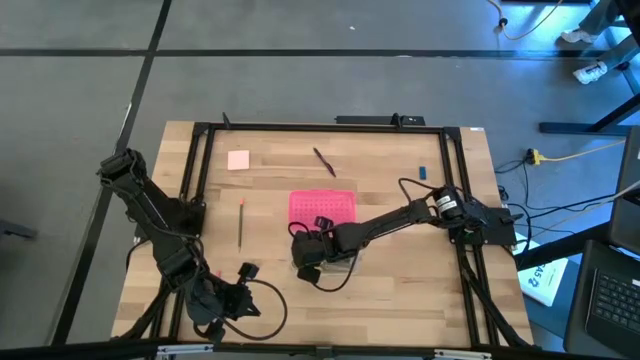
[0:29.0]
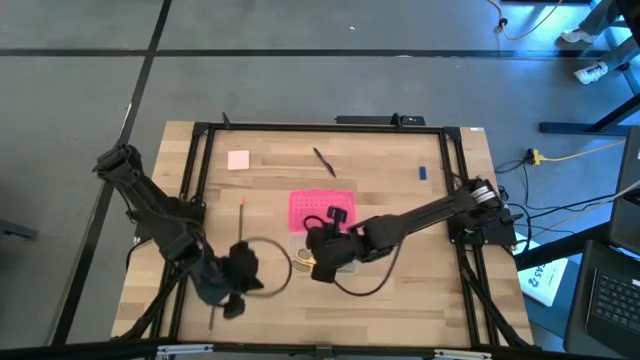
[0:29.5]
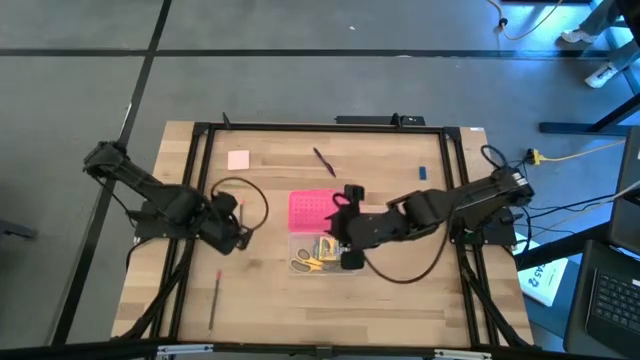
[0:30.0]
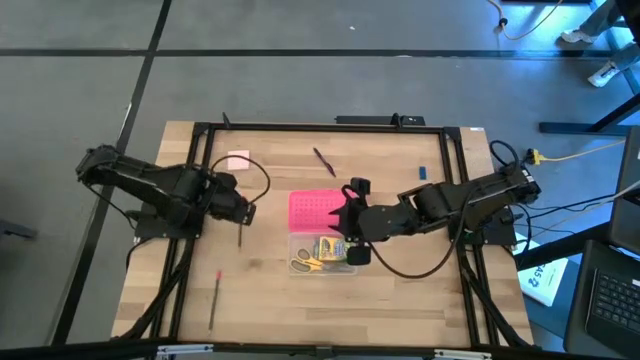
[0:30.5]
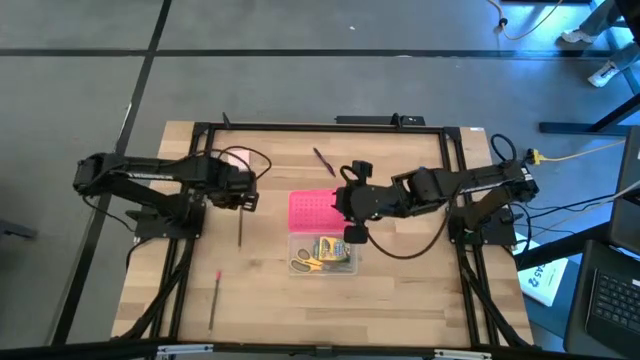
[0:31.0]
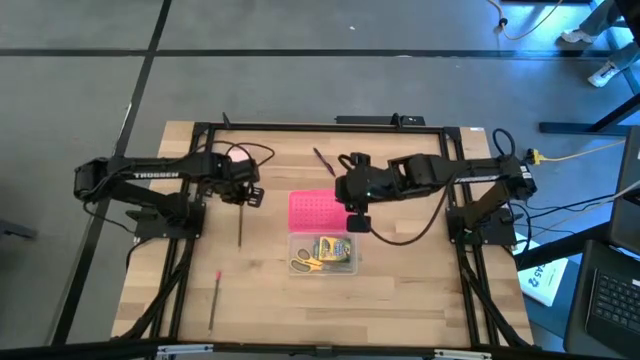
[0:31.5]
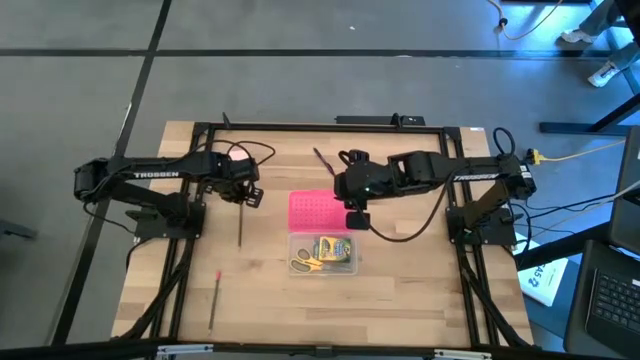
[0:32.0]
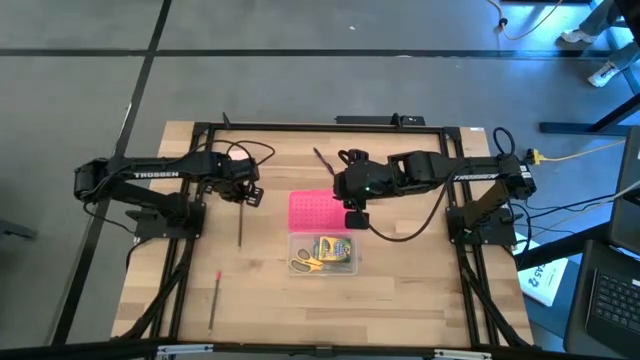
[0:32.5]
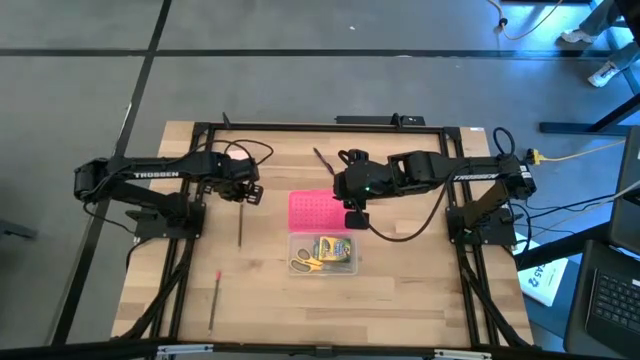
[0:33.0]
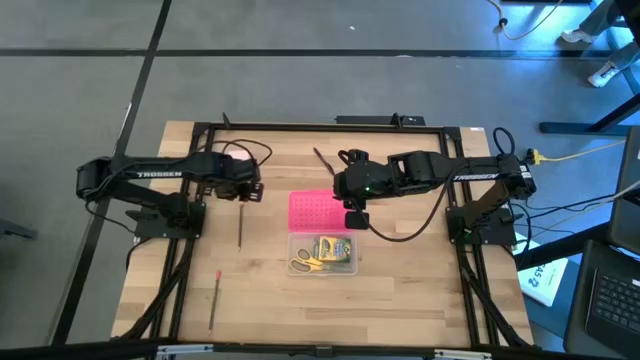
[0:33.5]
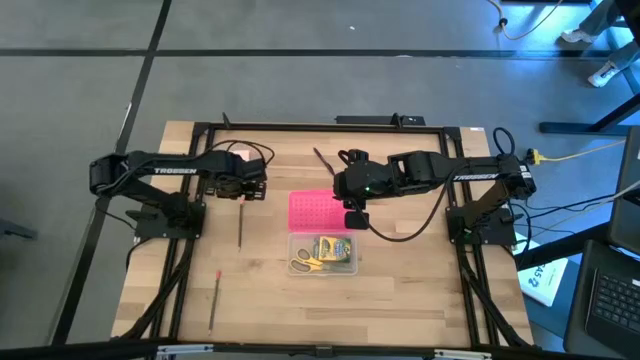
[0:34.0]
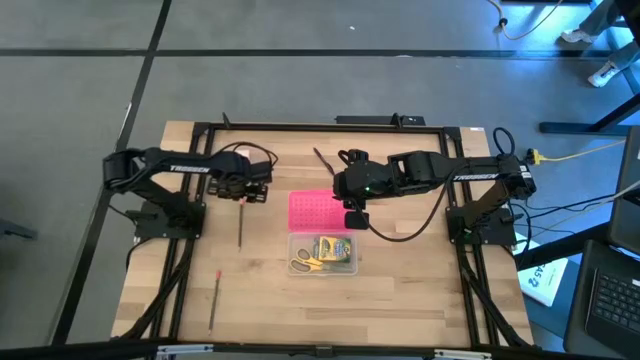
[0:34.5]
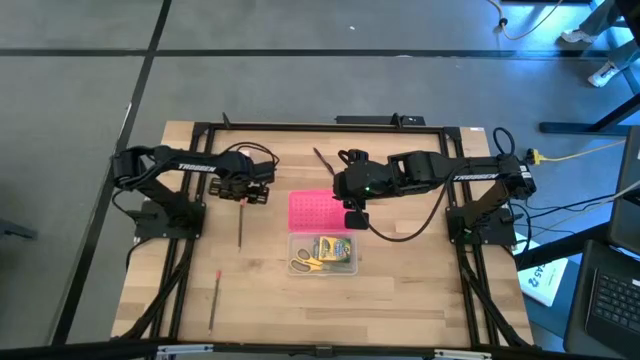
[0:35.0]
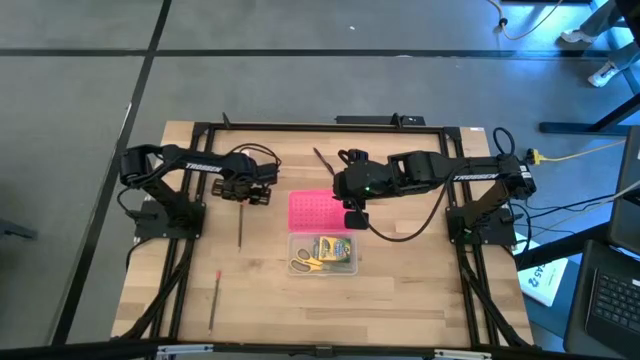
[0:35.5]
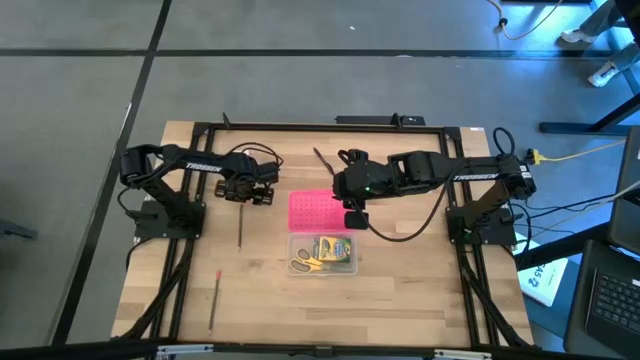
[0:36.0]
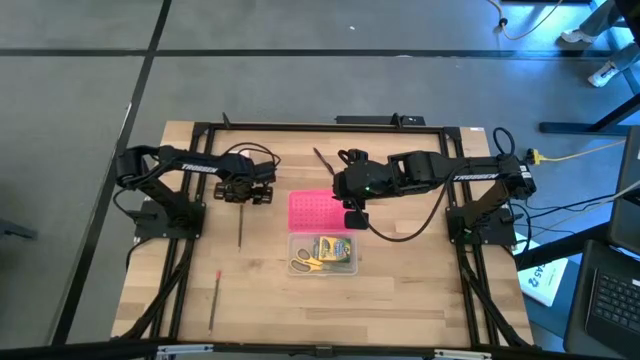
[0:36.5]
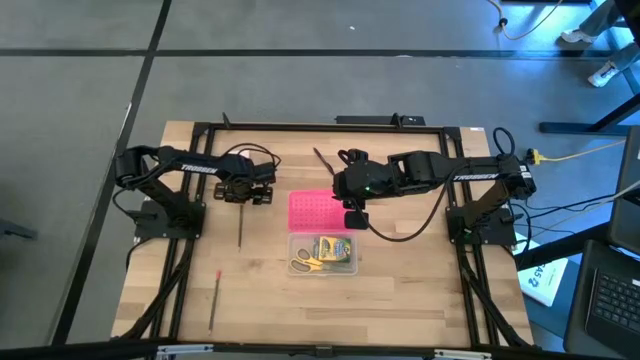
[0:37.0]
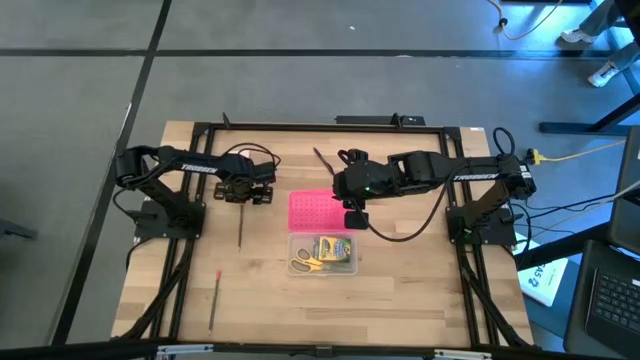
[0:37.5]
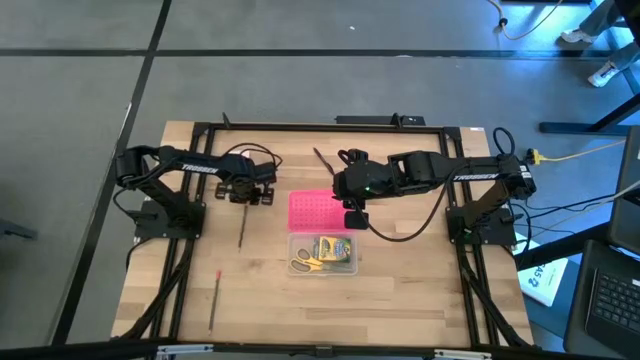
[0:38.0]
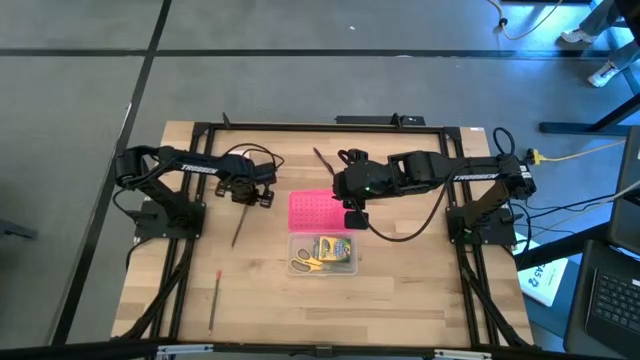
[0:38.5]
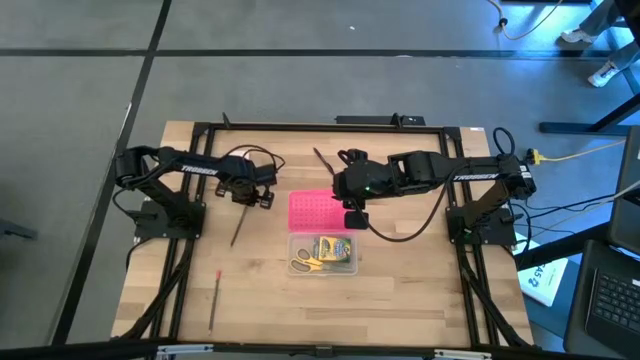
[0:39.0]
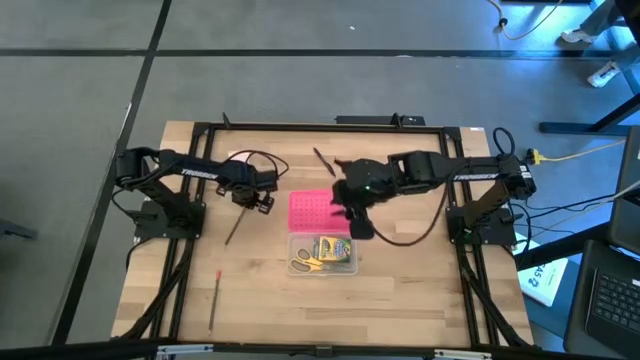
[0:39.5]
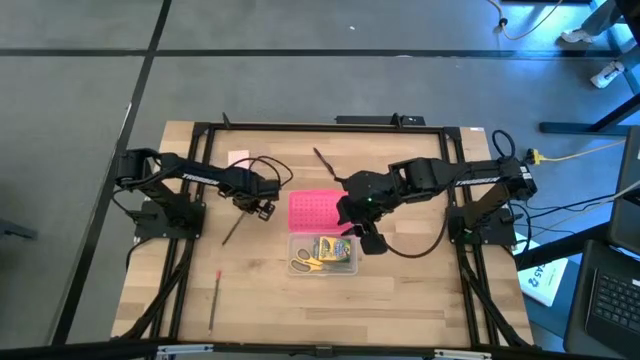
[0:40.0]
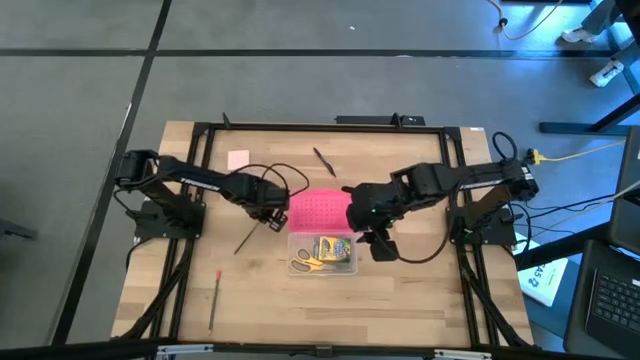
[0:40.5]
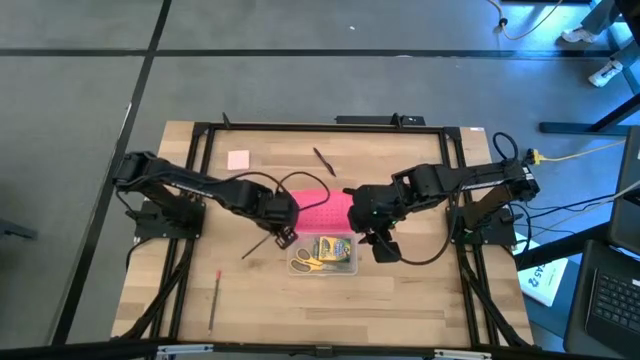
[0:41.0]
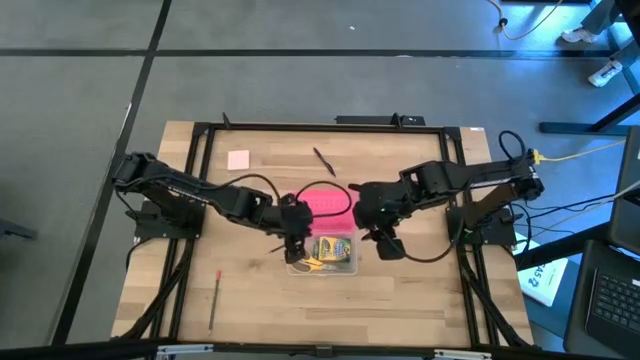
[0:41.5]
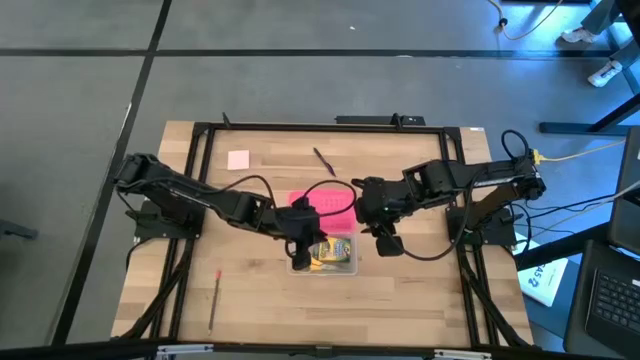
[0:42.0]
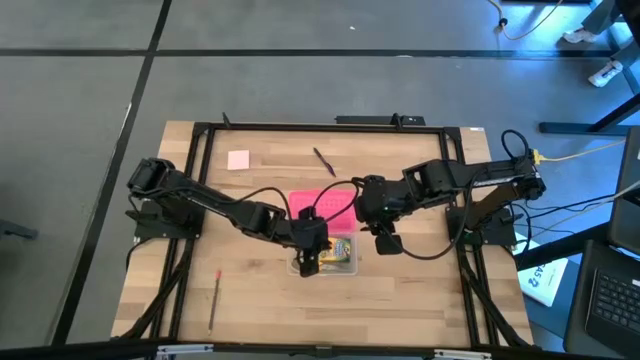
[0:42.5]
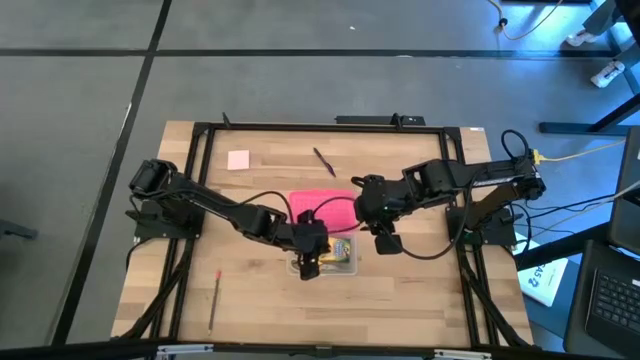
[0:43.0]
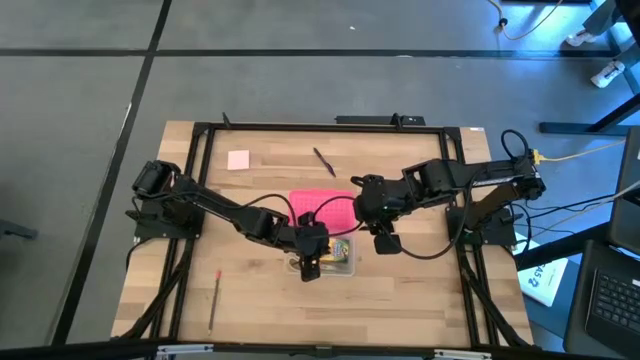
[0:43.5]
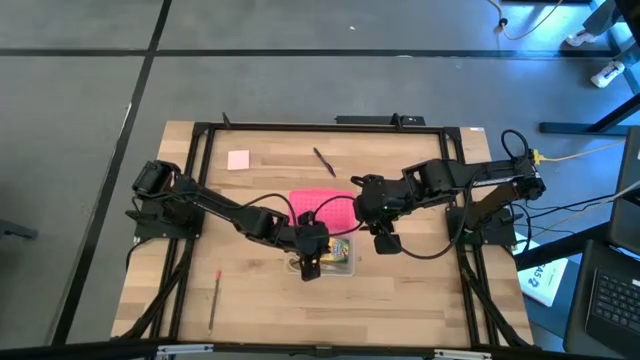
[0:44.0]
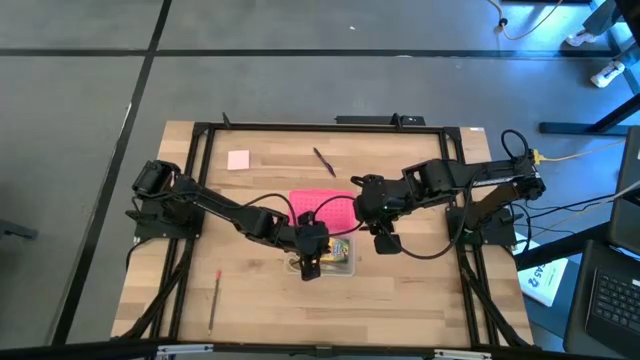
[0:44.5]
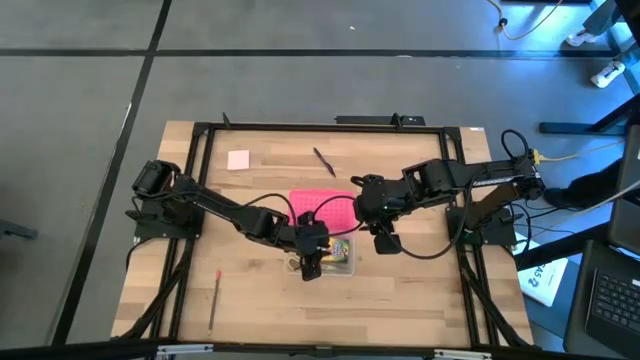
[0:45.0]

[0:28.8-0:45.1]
Task: Pack school essentials
Put the top black pencil into the pink supply box

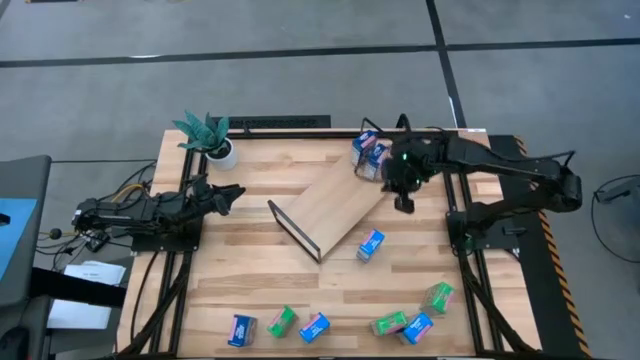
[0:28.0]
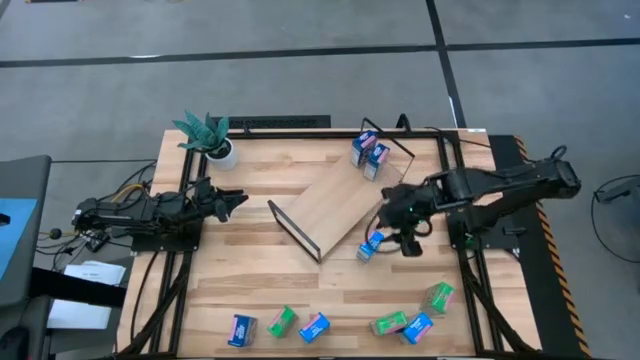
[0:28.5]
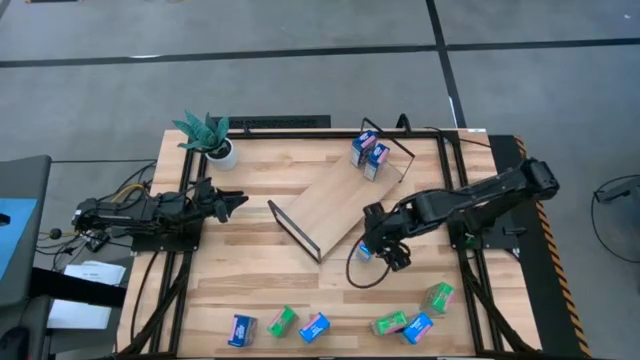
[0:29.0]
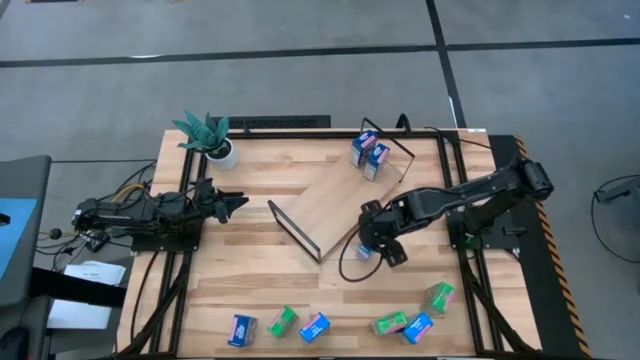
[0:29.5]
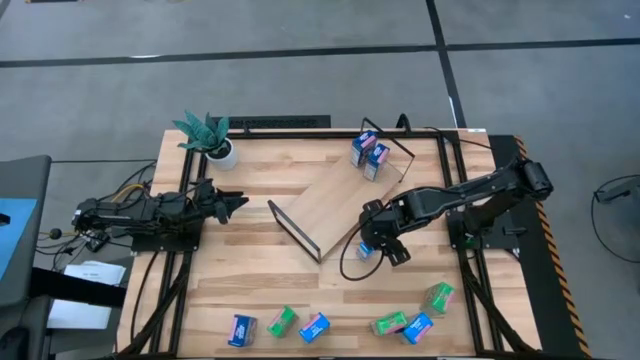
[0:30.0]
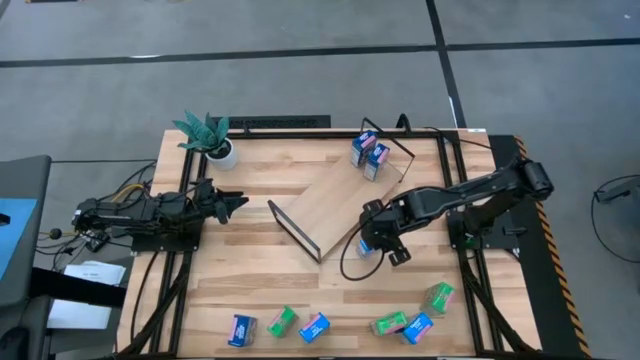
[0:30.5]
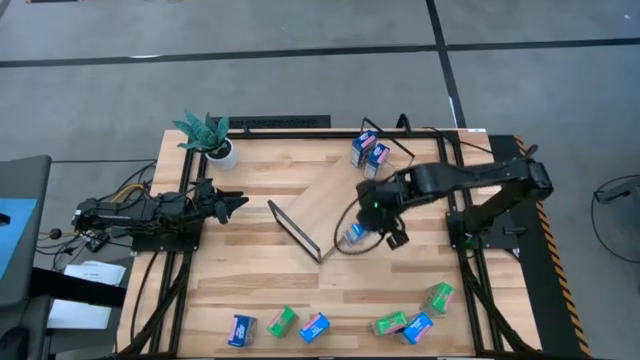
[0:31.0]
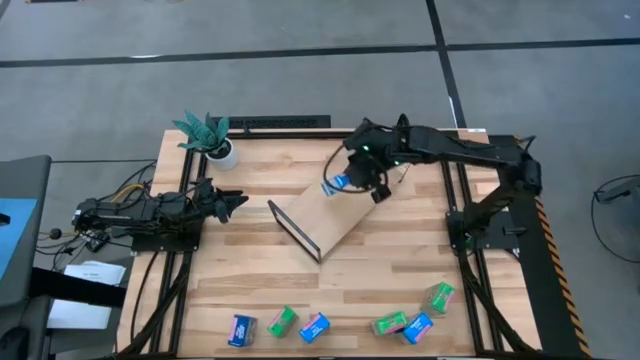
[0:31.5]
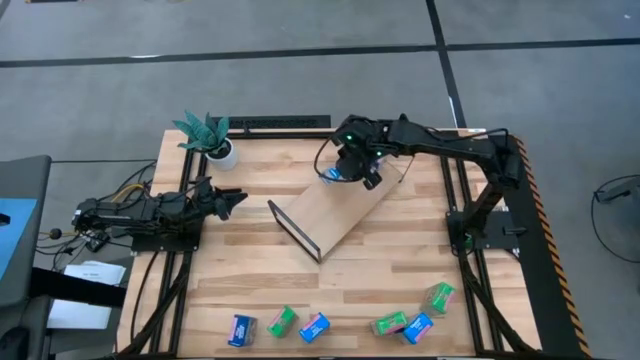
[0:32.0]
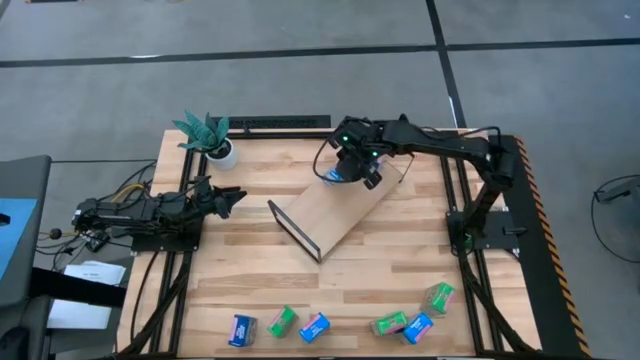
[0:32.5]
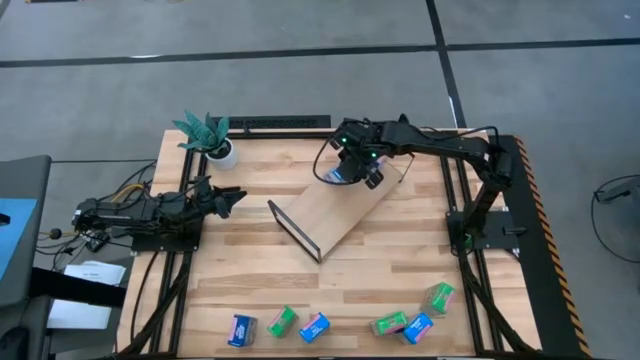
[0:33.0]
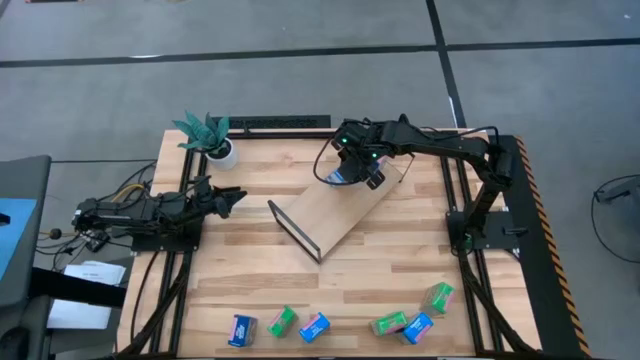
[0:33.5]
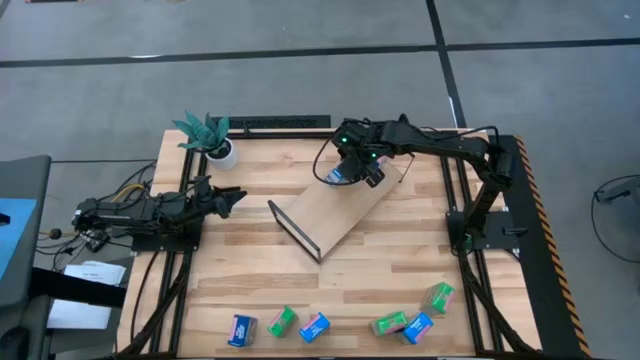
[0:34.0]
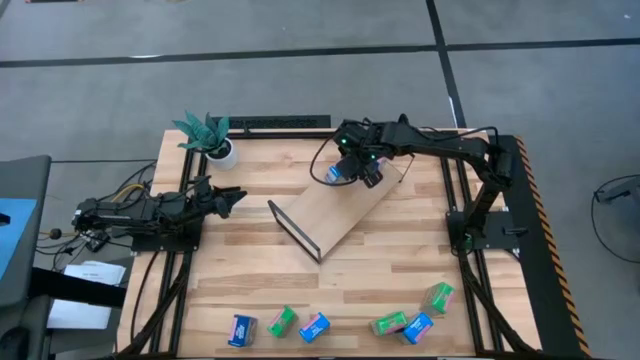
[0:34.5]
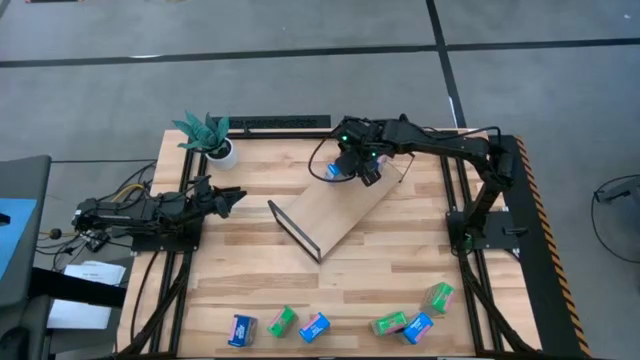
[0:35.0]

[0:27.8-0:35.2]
Task: Stack cereal on shelf
Put the top light blue cereal box on the shelf
